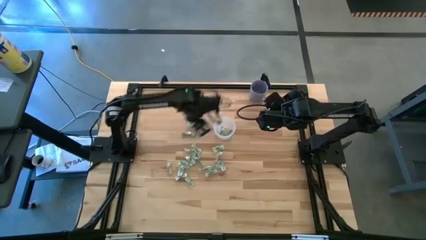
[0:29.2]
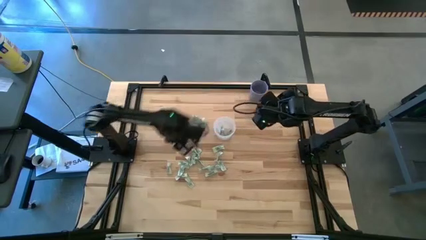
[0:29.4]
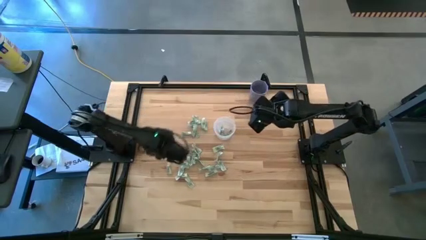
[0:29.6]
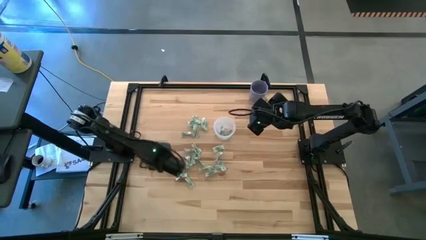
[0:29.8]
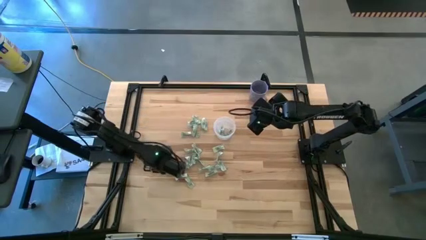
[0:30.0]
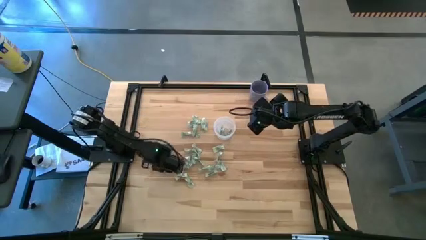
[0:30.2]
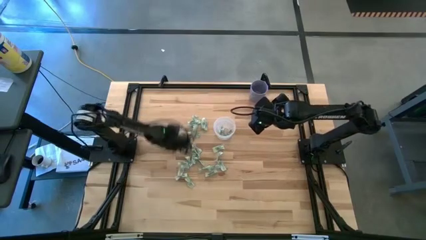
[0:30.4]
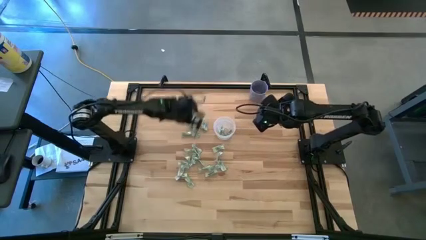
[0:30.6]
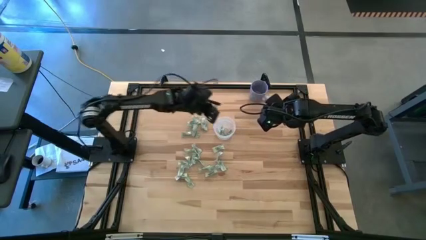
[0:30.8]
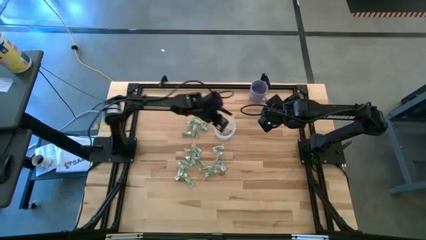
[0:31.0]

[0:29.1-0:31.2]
Task: Pick and place Stevia / Truvia into bins
Put the stevia packet into the transparent container

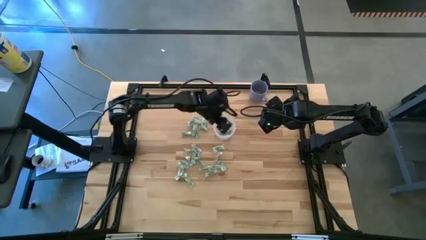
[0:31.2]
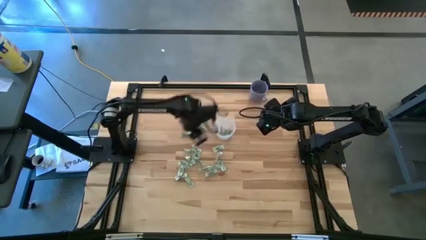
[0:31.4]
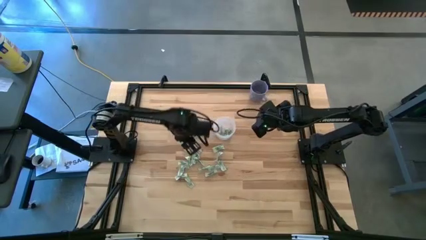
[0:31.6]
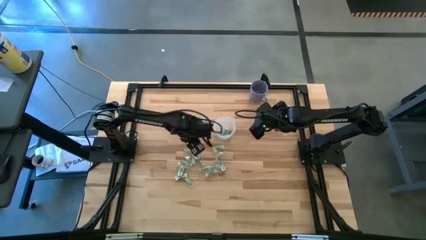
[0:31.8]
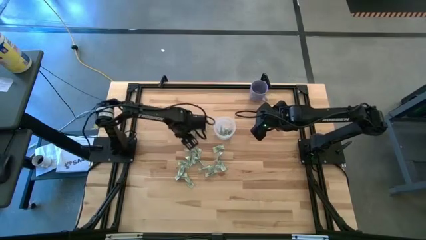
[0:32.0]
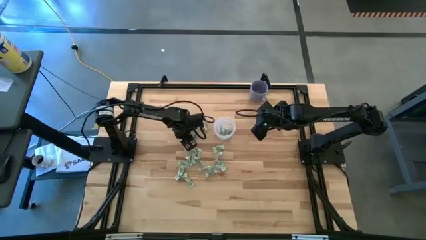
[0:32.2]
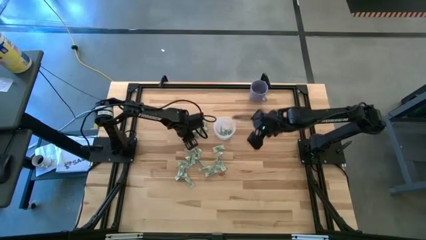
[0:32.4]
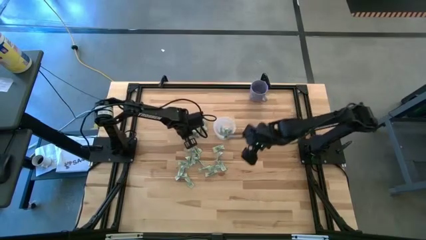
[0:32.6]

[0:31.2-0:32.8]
Put the stevia packet into the transparent container

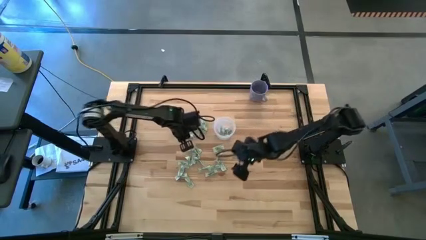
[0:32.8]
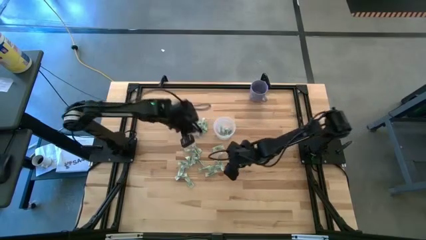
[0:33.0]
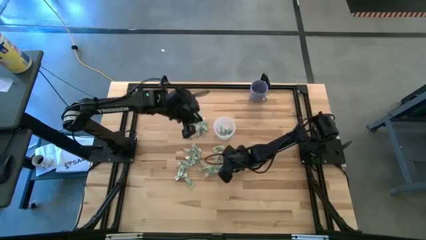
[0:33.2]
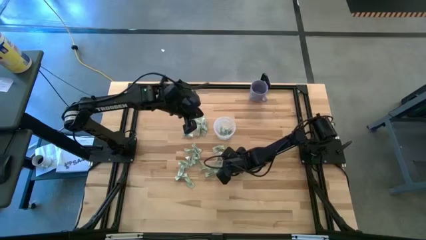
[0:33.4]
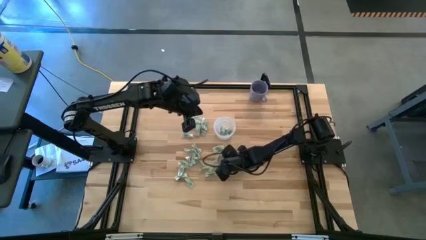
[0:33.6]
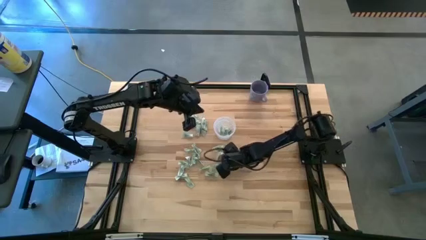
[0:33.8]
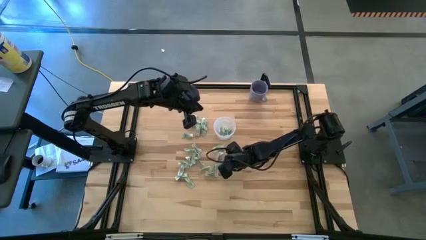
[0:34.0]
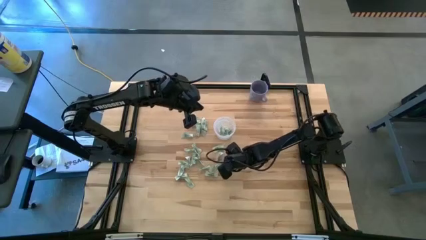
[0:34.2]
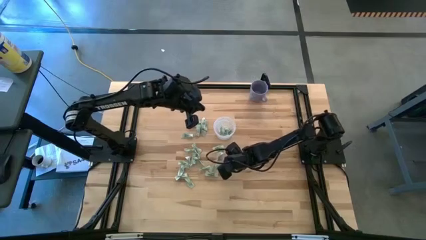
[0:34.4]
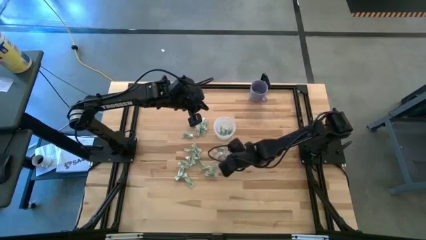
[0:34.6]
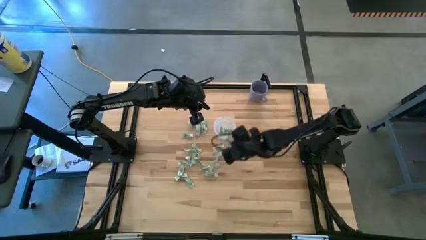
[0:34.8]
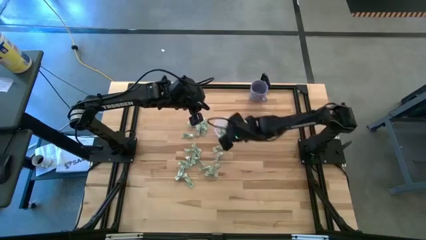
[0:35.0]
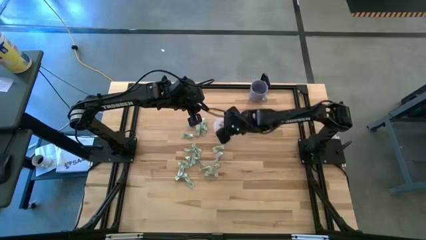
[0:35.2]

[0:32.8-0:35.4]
Put the stevia packet into the transparent container

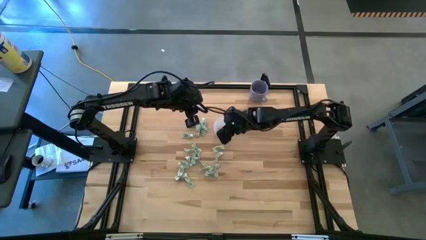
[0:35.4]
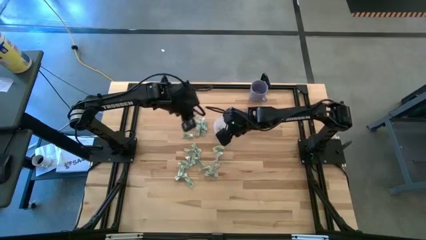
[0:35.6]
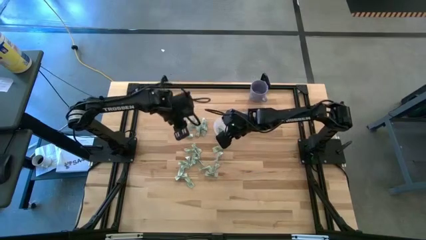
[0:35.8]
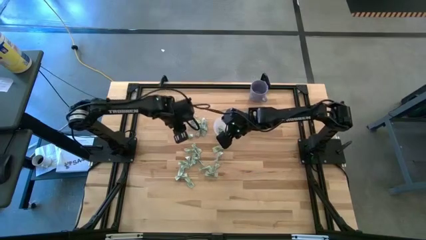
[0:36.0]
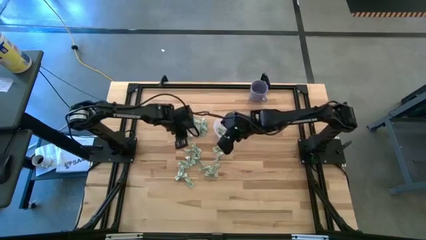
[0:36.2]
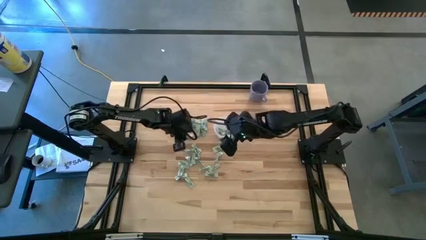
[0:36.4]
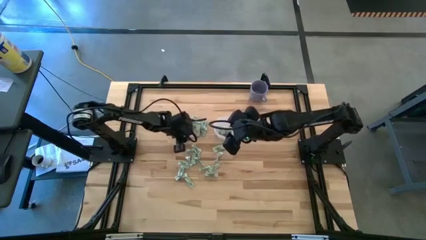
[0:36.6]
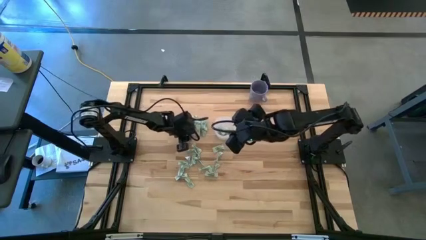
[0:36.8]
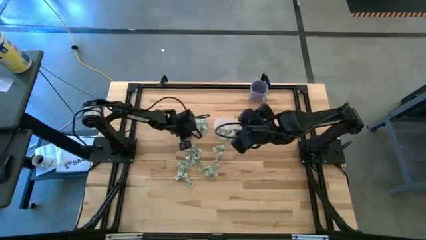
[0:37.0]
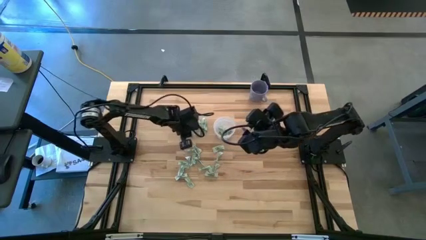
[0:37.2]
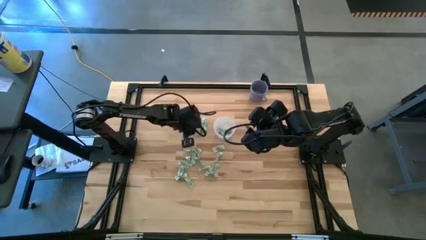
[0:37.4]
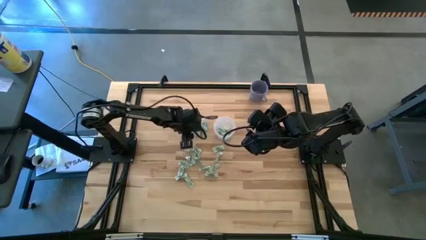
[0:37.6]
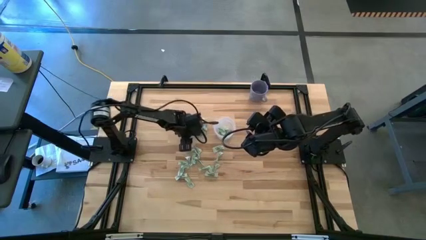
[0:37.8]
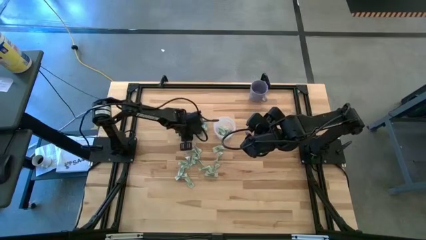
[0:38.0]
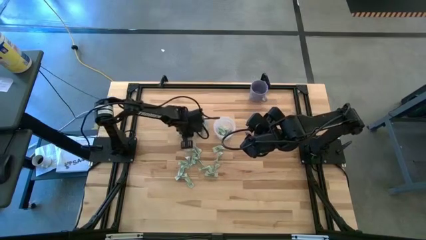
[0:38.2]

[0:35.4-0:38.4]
Put the stevia packet into the transparent container

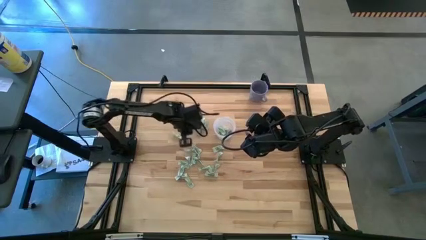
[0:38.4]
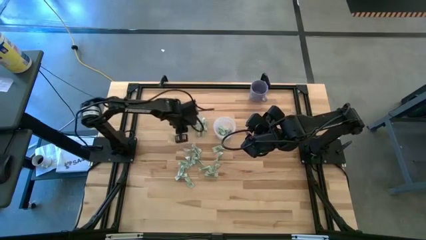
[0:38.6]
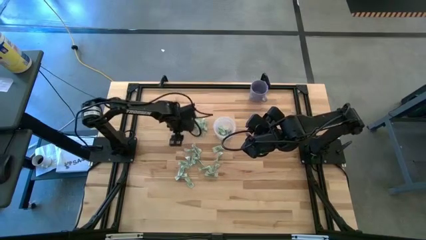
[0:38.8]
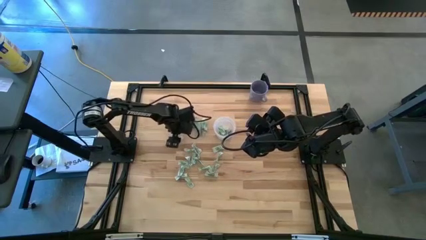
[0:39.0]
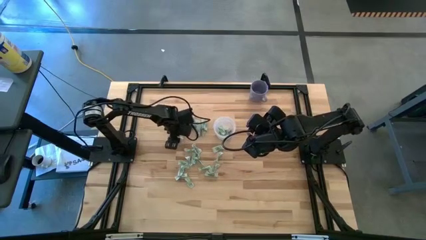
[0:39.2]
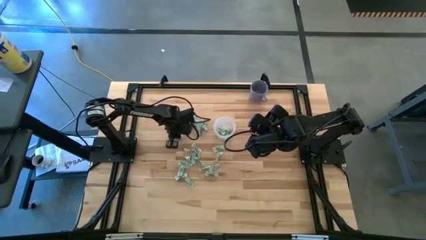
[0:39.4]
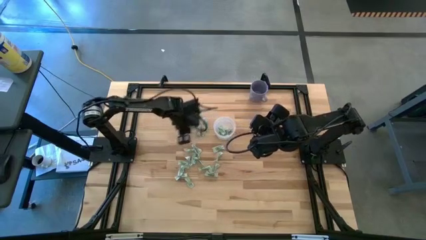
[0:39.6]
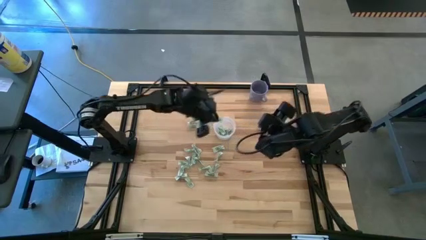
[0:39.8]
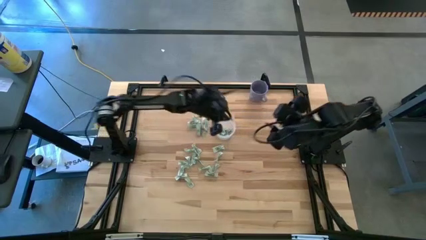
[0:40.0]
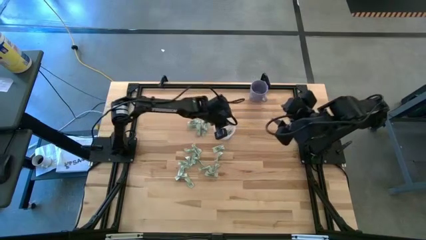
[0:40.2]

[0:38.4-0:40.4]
Put the stevia packet into the transparent container

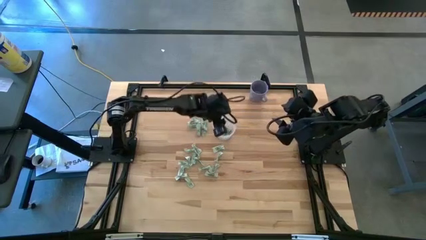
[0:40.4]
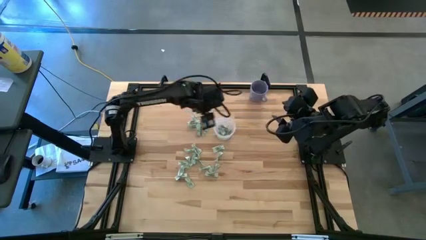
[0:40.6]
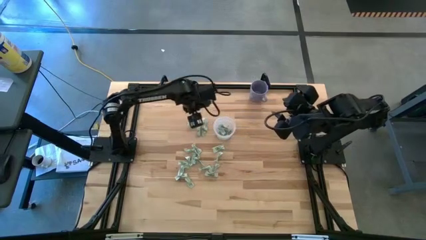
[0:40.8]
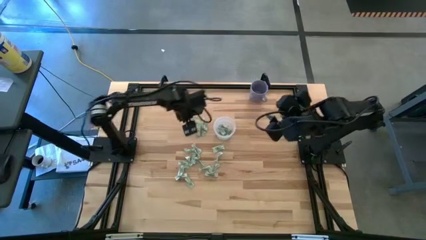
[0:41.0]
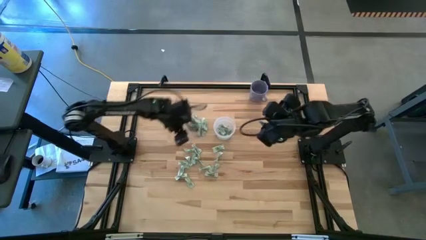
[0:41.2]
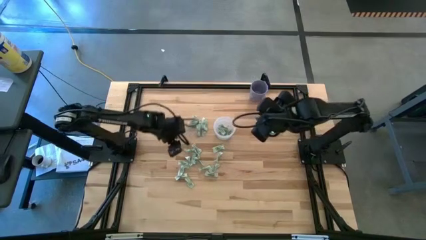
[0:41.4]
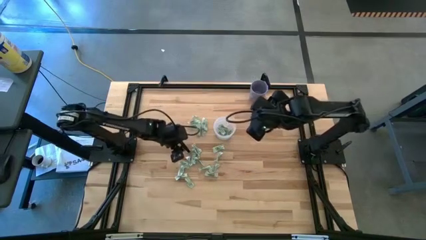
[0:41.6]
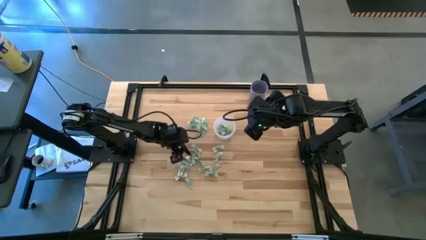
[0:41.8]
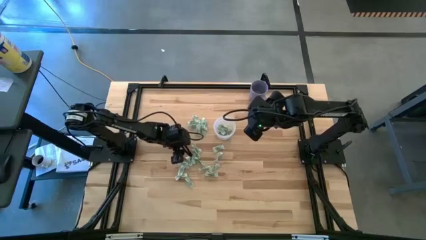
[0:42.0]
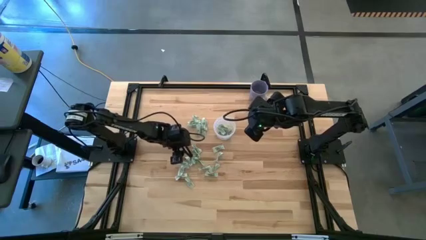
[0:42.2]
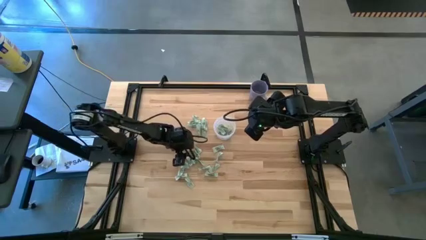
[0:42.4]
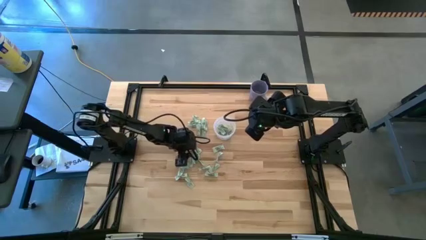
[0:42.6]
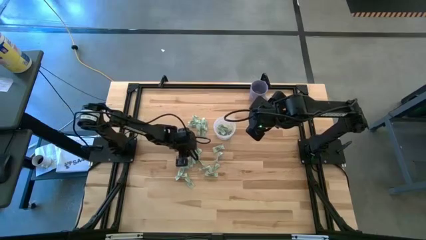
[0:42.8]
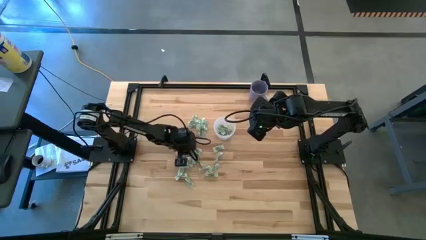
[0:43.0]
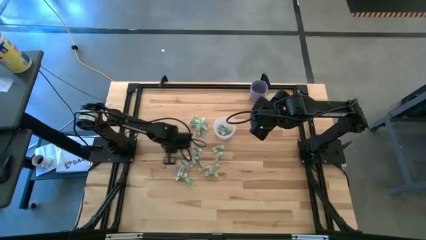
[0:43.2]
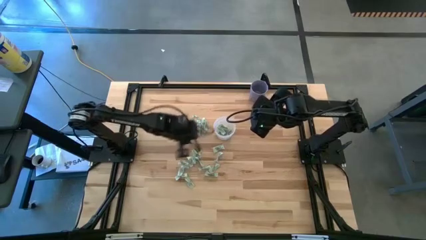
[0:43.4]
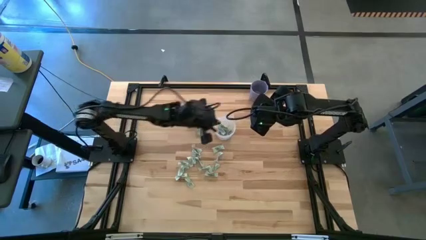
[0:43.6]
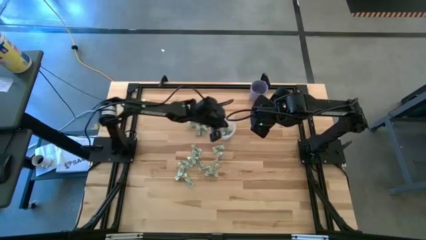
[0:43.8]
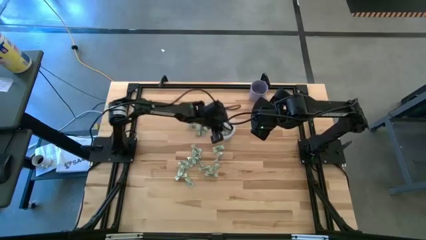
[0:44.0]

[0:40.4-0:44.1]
Put the stevia packet into the transparent container

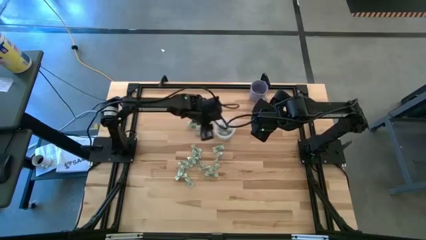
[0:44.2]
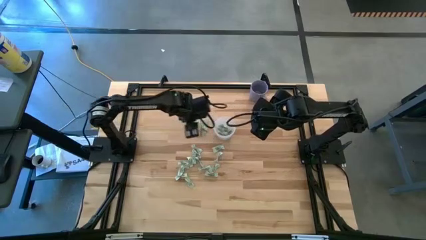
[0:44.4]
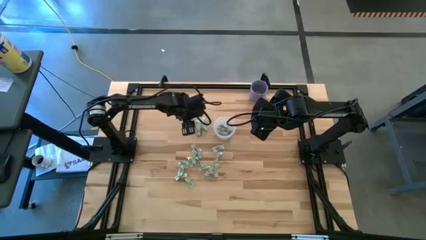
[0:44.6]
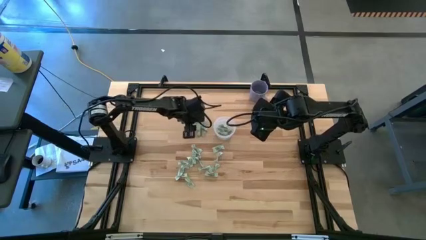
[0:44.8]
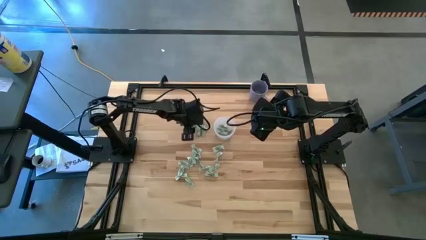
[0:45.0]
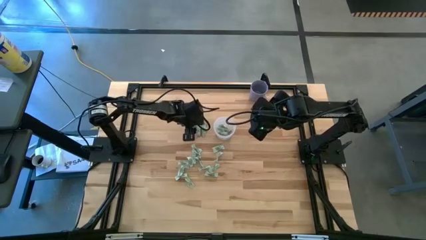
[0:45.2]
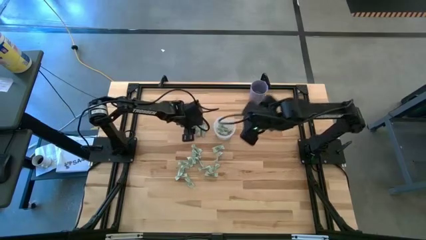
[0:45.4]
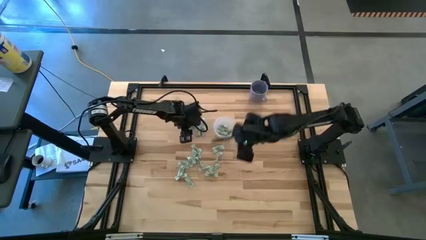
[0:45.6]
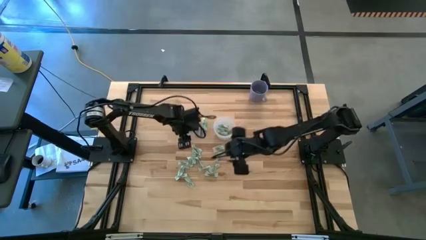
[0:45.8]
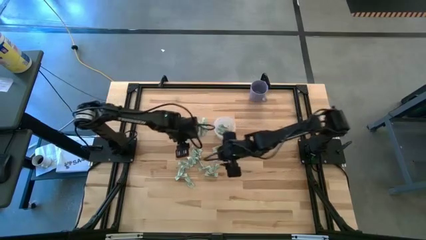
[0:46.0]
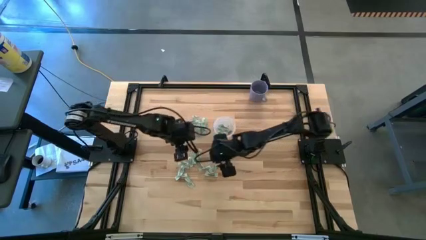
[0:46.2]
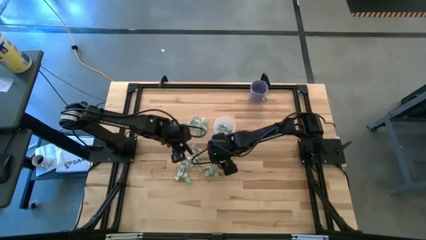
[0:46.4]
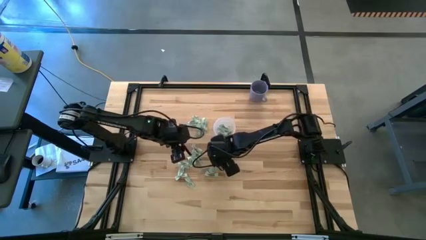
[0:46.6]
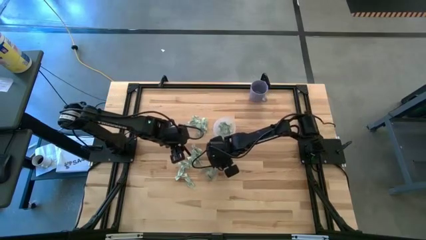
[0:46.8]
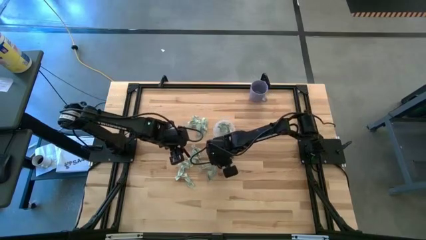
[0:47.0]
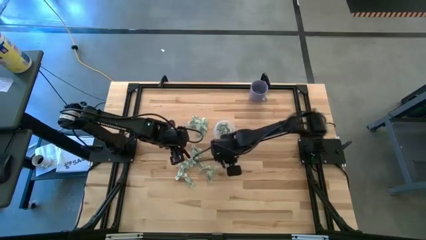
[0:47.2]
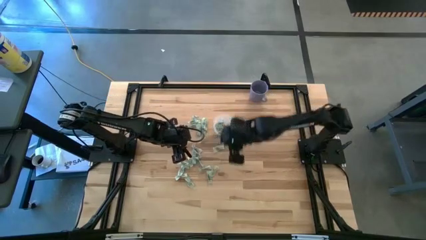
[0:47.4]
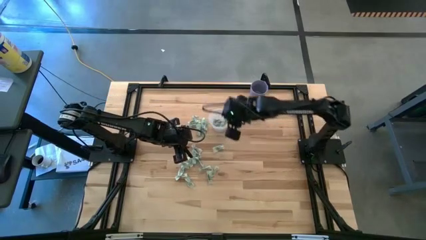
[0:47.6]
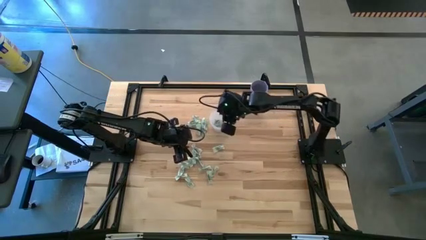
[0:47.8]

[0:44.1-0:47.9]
Put the stevia packet into the transparent container
